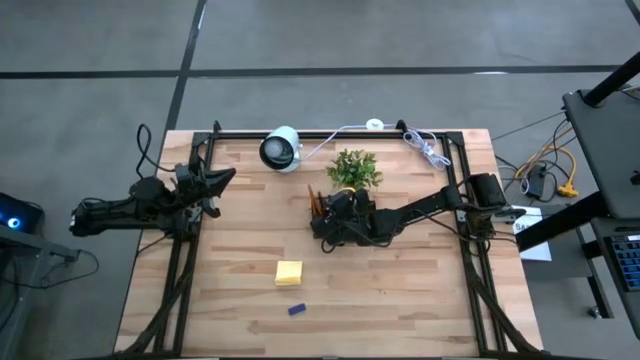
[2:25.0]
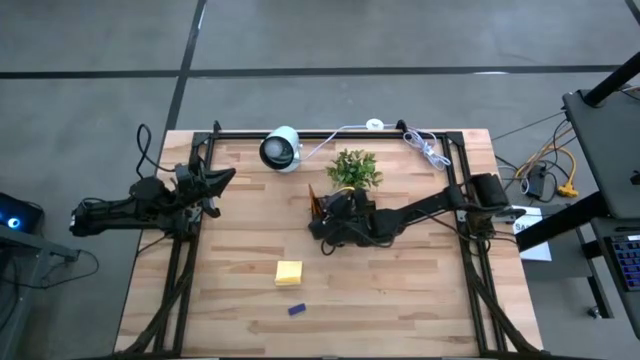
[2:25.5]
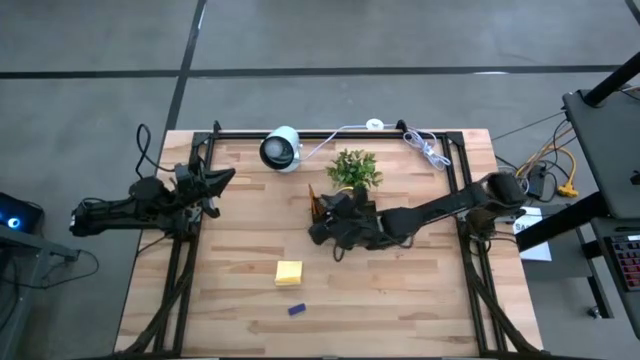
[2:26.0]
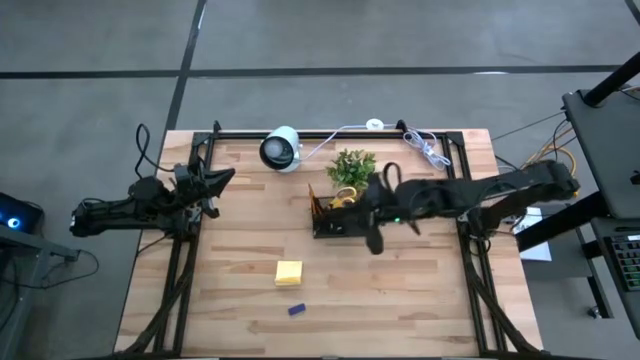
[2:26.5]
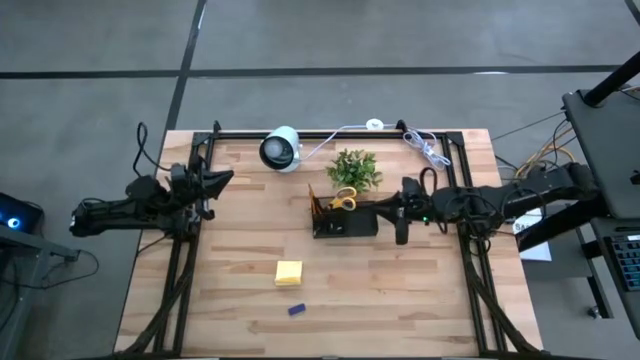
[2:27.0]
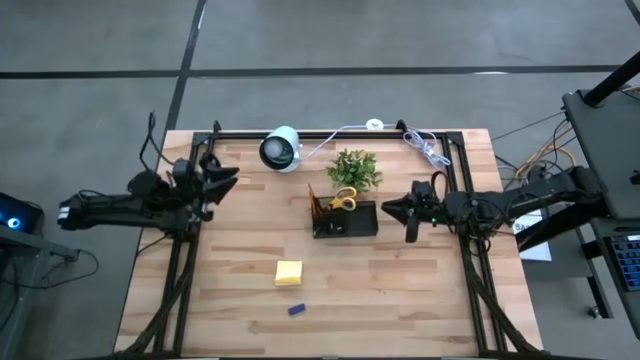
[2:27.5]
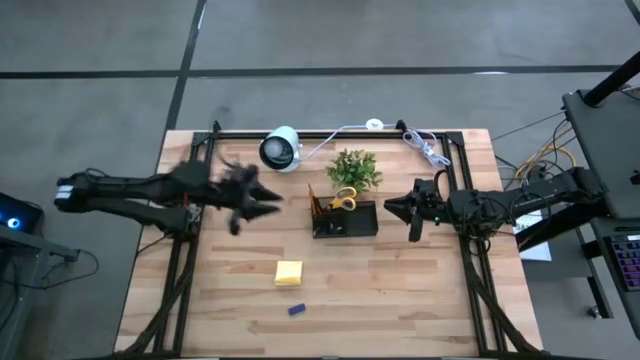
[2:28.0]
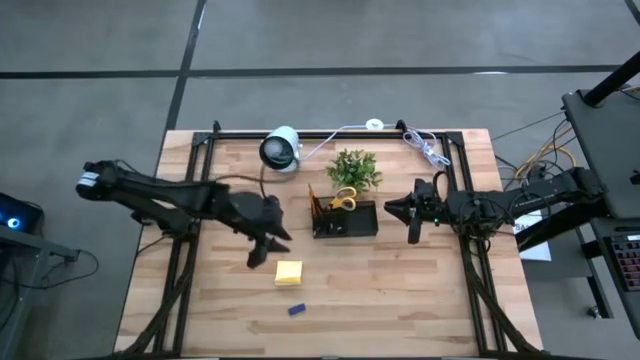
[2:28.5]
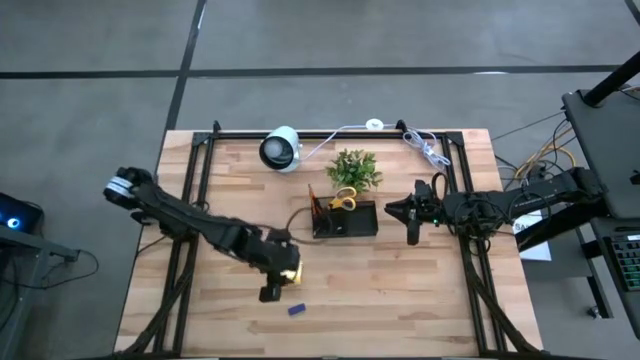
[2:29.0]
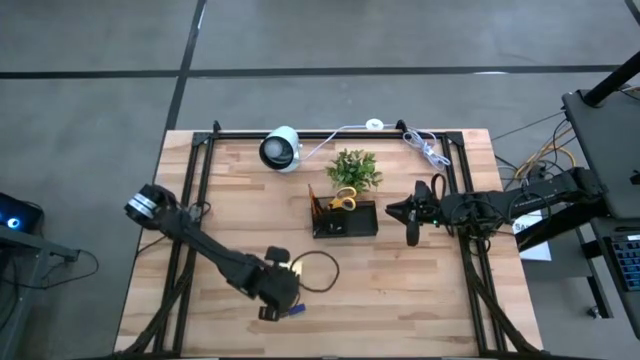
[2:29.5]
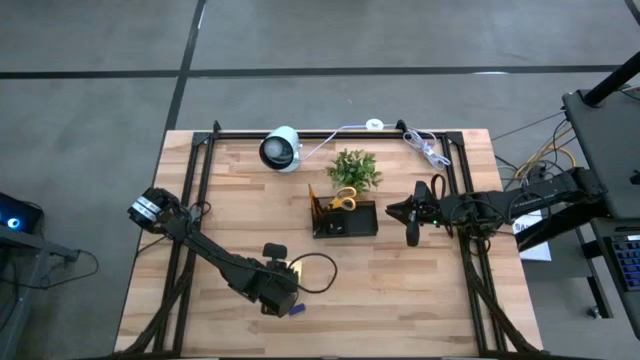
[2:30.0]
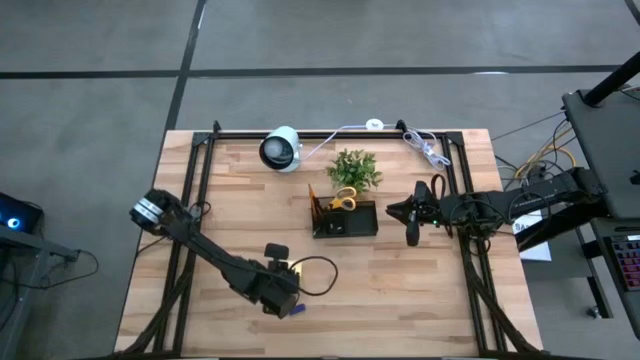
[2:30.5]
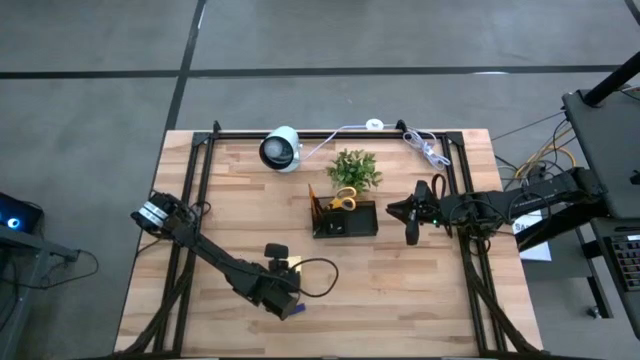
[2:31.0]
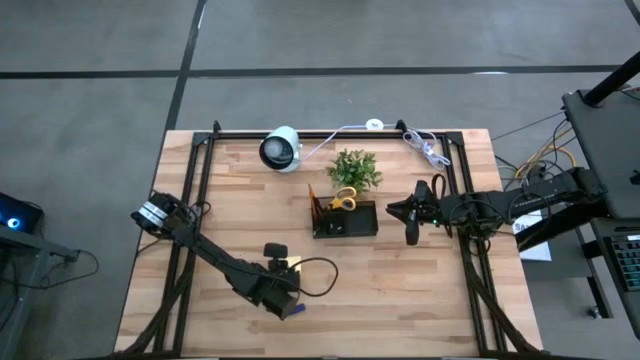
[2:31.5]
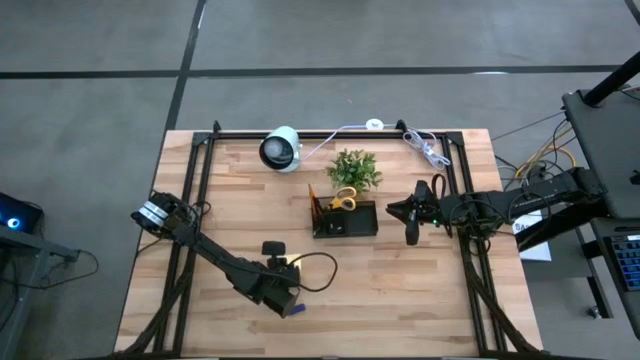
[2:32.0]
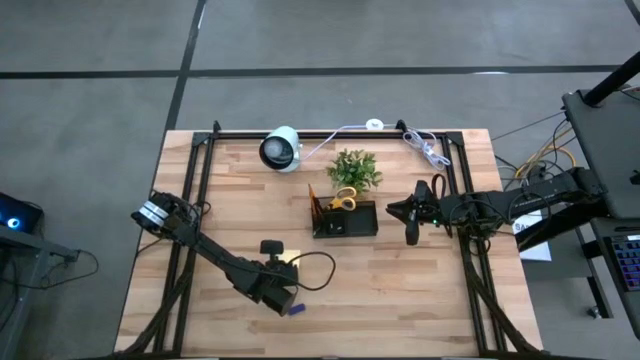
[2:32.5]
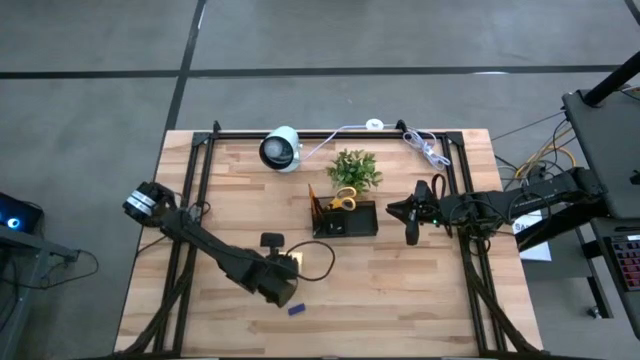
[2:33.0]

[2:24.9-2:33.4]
Task: Pick and place office supplies into organizer
Put the yellow sticky notes into the black desk organizer

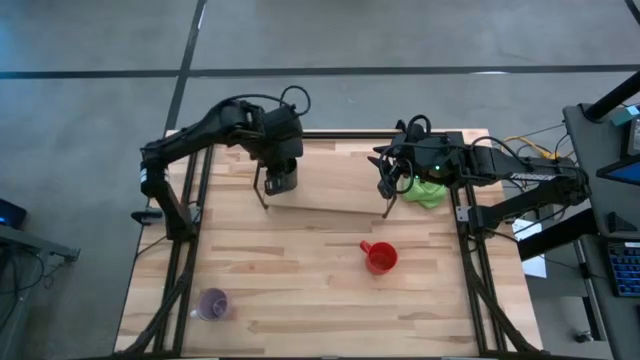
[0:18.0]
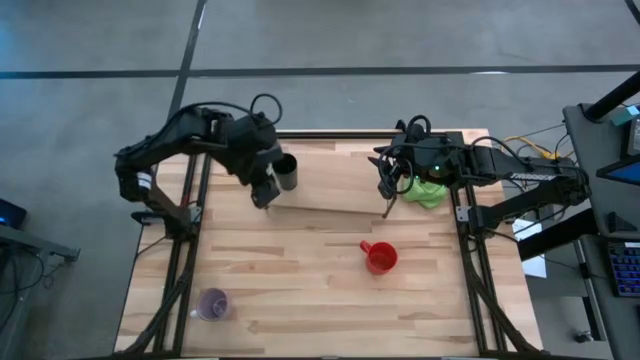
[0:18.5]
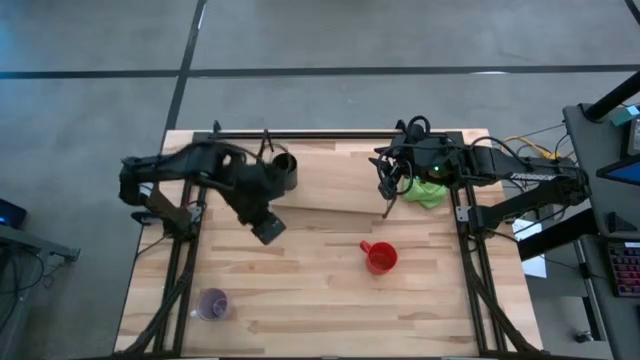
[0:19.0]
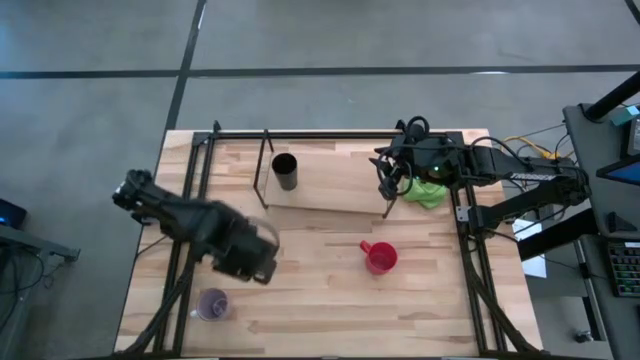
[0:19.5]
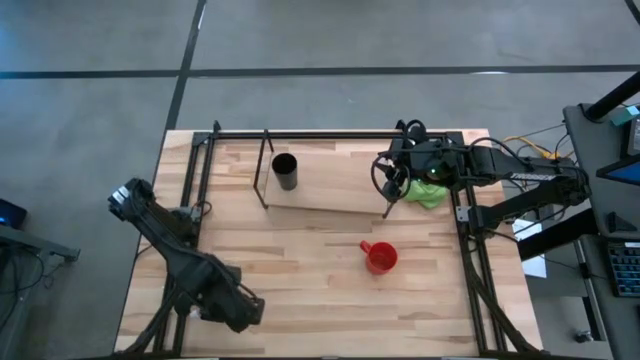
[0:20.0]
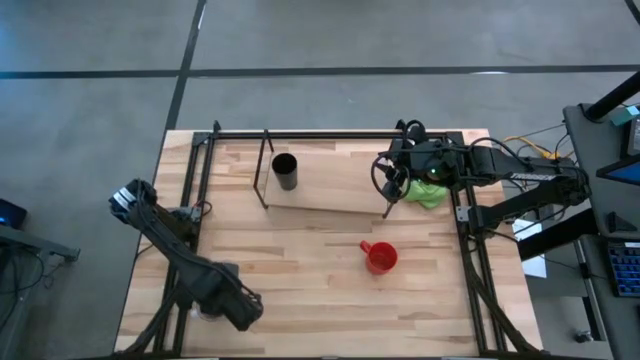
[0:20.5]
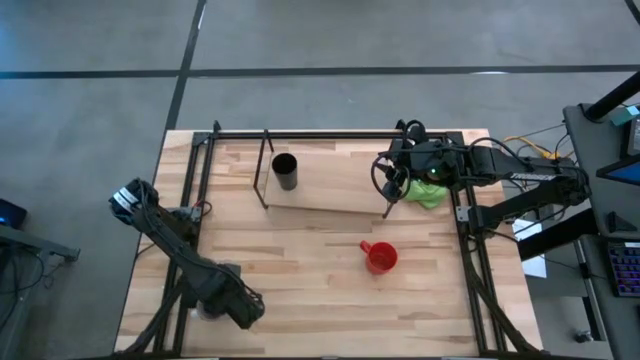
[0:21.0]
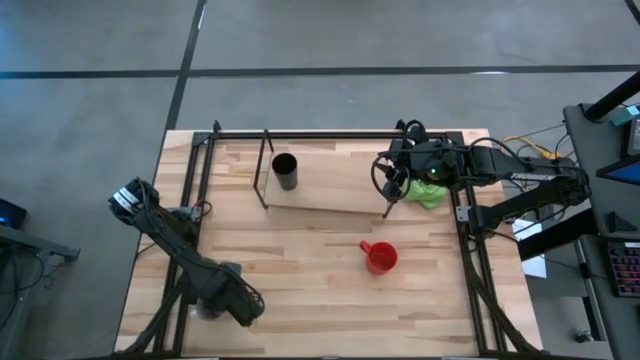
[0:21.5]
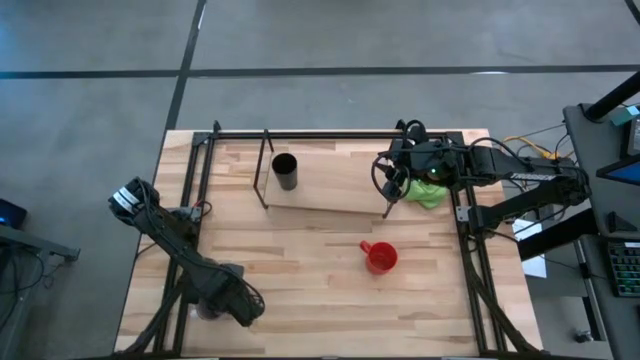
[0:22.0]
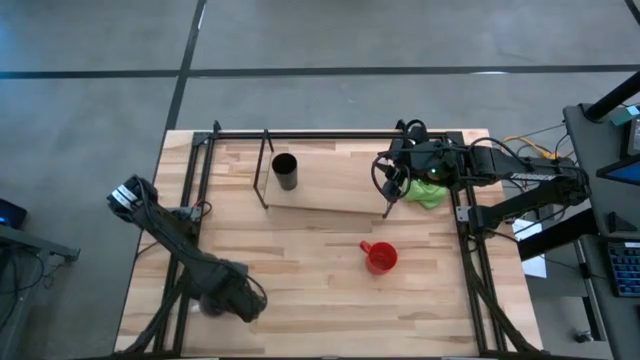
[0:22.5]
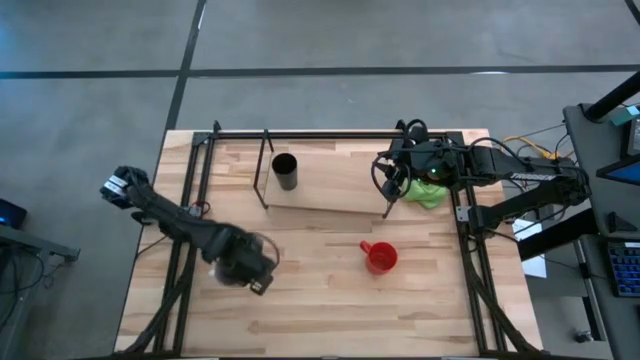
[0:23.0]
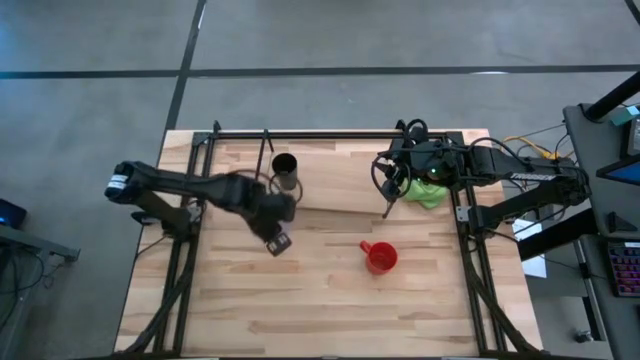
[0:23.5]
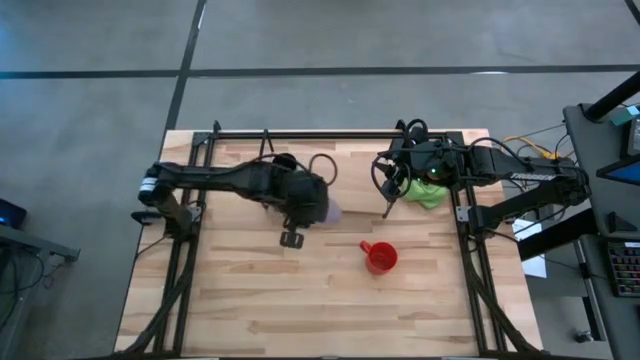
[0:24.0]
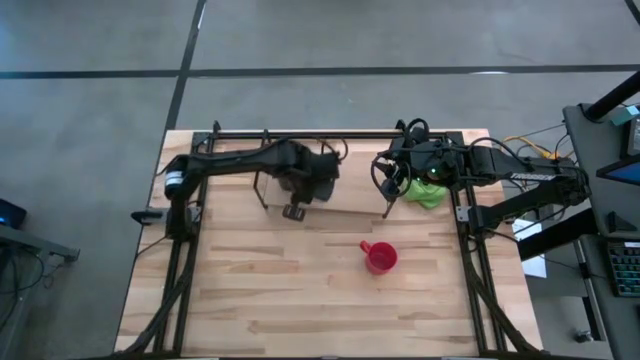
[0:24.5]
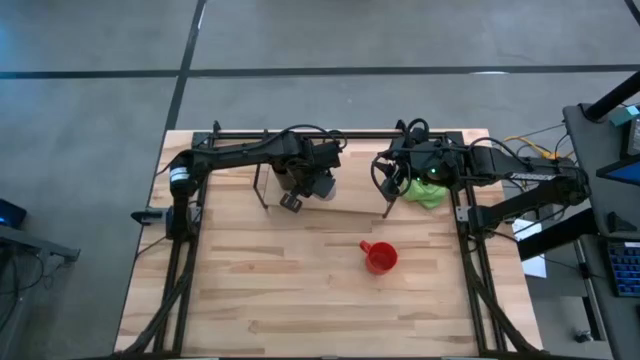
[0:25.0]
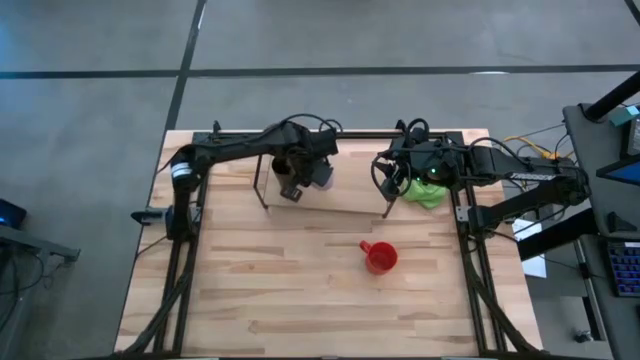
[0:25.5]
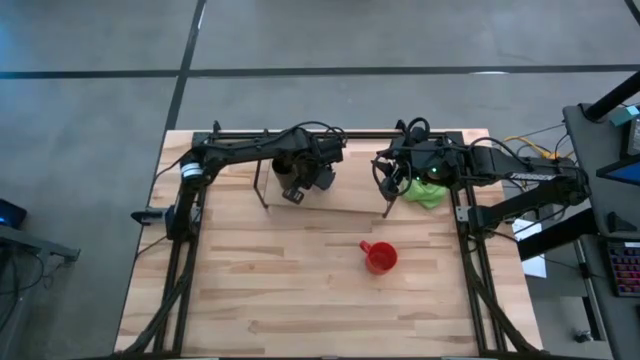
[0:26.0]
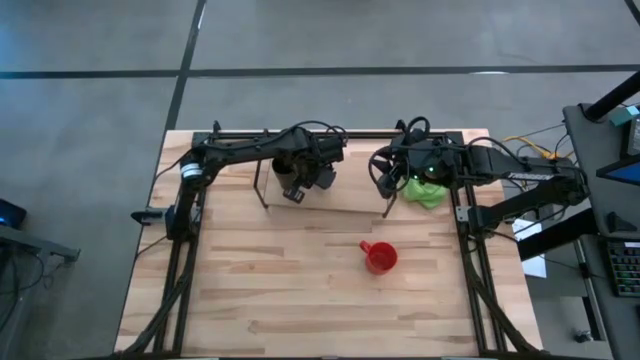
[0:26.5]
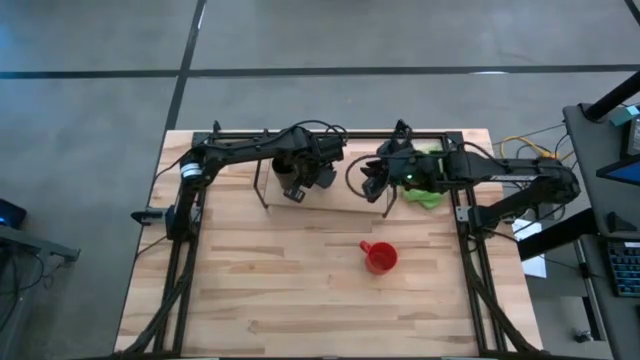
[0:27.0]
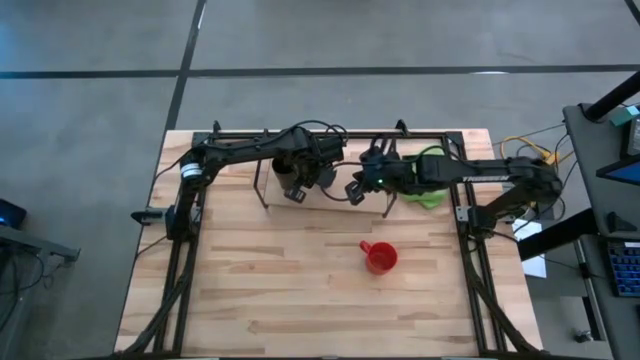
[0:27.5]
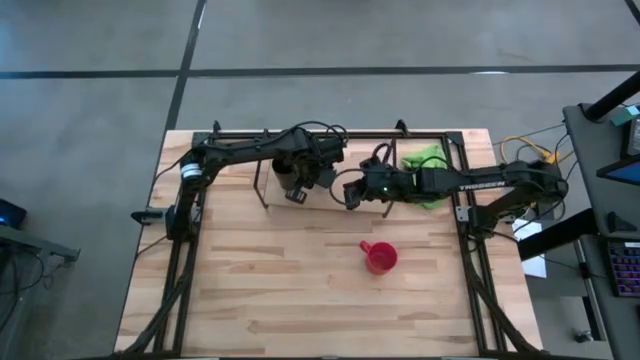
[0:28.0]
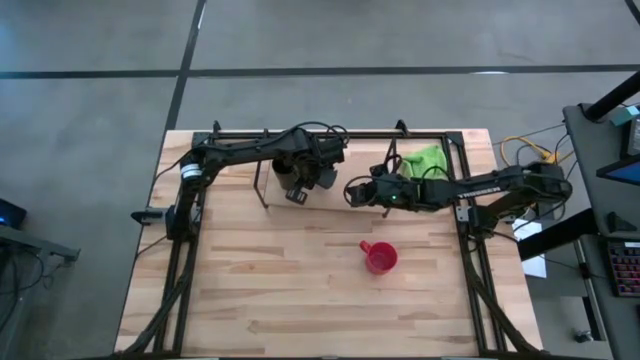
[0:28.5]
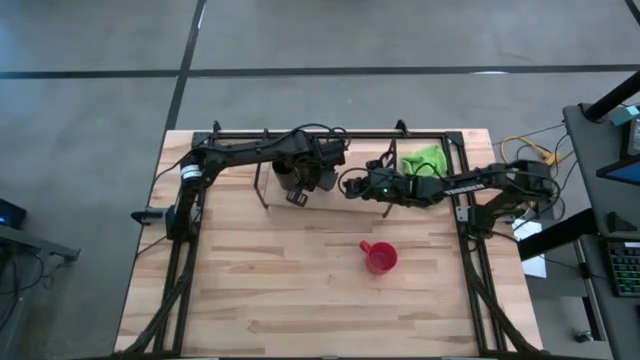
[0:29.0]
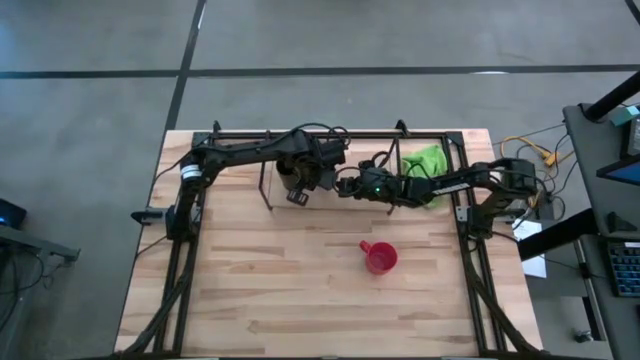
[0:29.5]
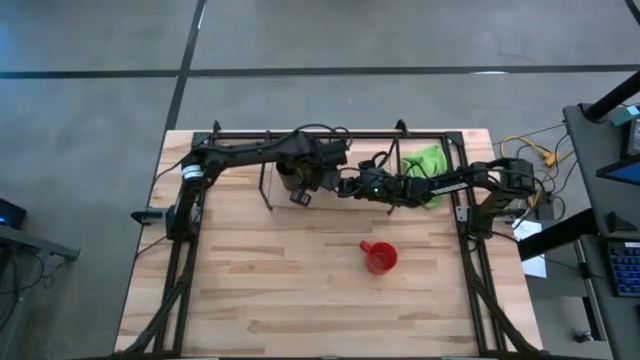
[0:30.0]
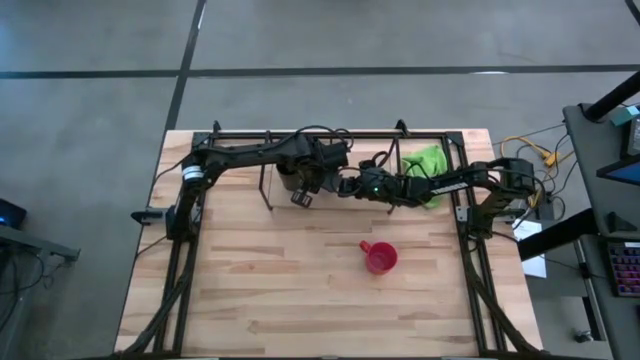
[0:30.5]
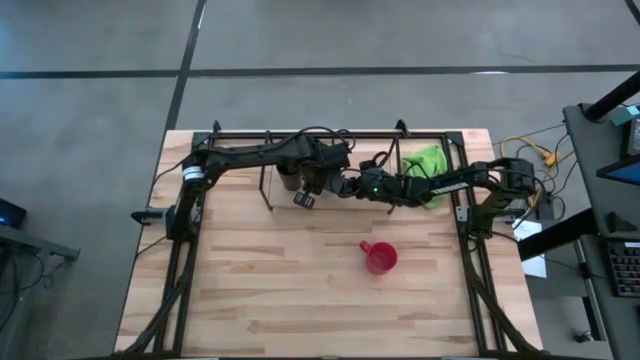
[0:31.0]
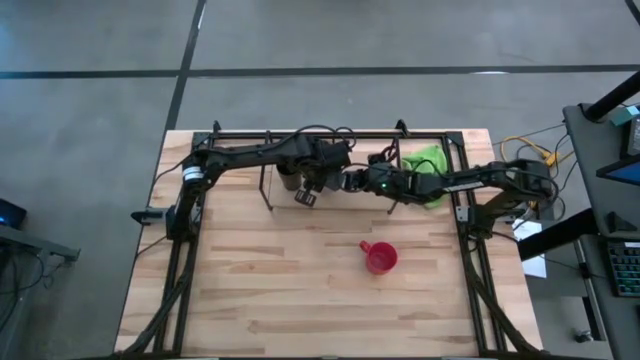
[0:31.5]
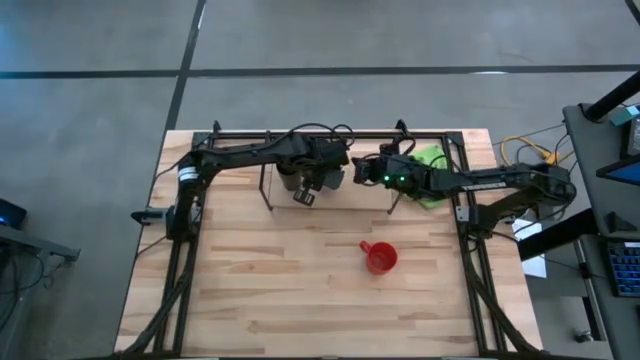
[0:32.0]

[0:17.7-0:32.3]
Task: Stack small to large cups/mugs on shelf
Put the purple mug on the shelf
